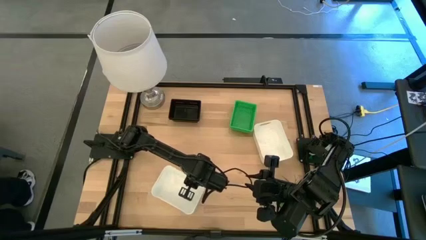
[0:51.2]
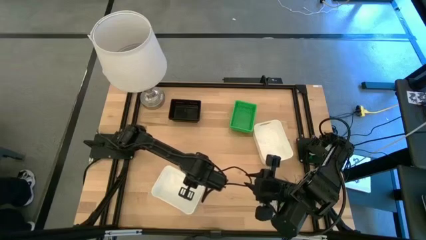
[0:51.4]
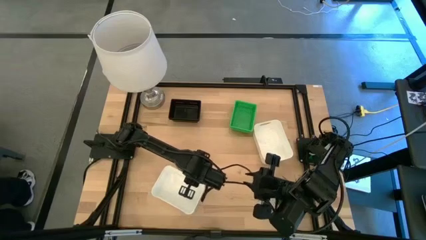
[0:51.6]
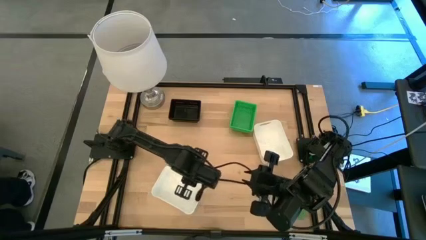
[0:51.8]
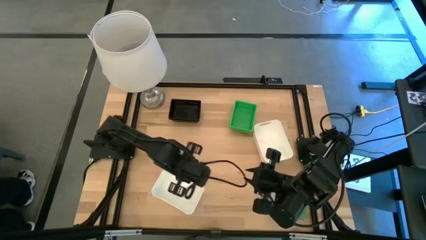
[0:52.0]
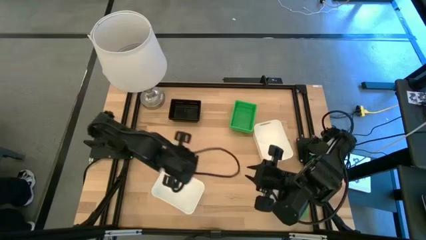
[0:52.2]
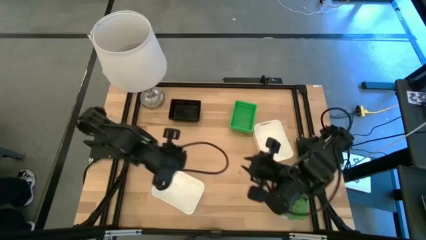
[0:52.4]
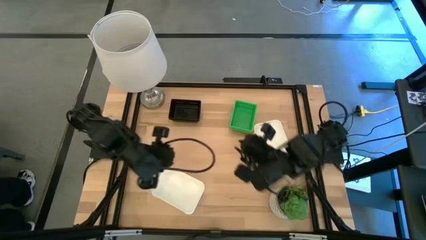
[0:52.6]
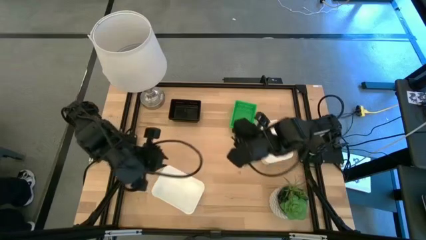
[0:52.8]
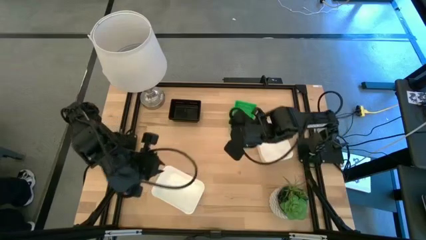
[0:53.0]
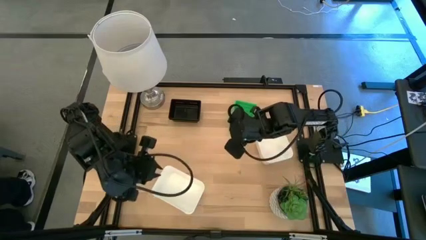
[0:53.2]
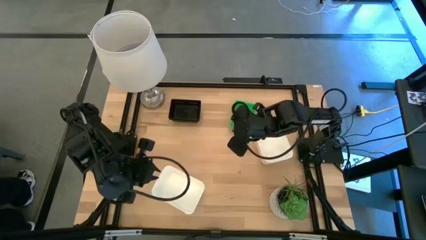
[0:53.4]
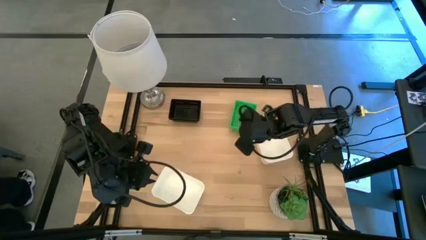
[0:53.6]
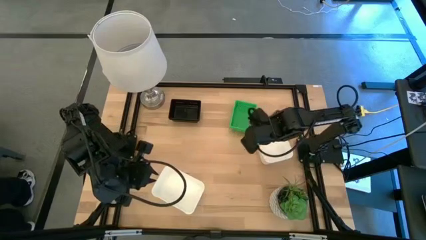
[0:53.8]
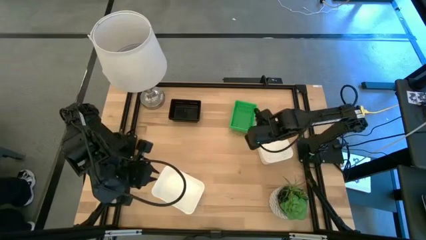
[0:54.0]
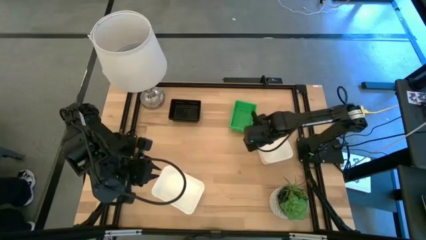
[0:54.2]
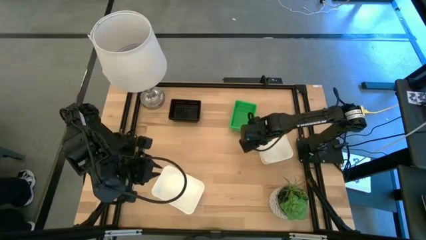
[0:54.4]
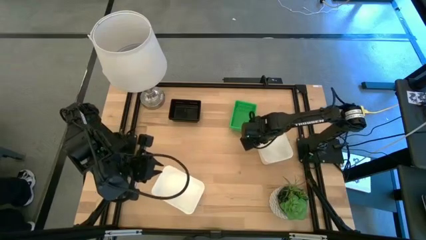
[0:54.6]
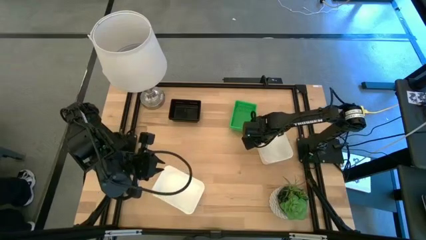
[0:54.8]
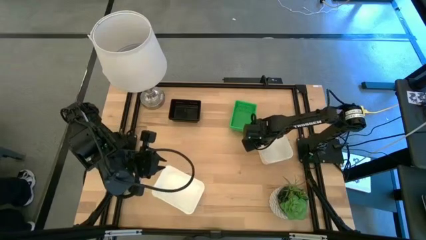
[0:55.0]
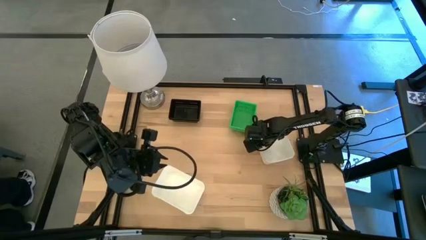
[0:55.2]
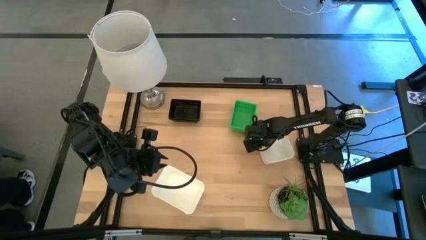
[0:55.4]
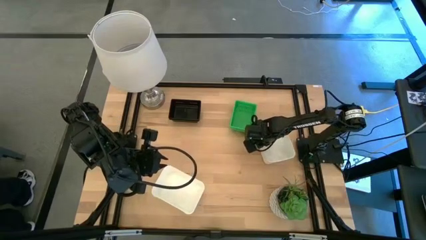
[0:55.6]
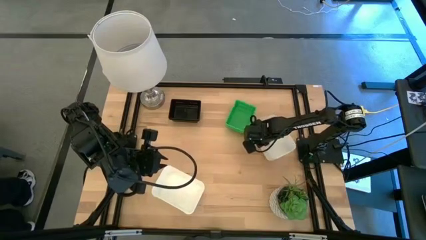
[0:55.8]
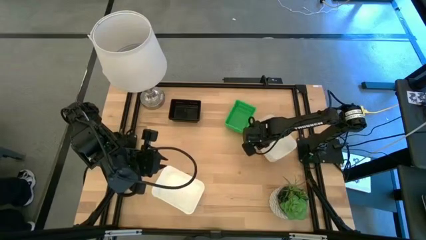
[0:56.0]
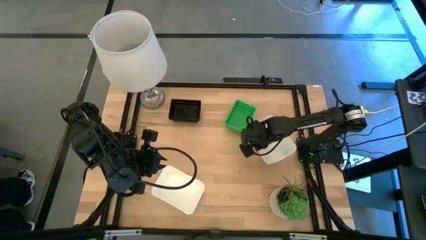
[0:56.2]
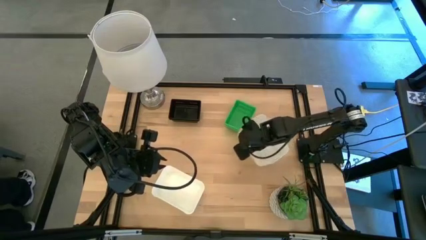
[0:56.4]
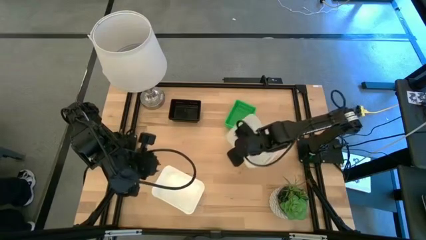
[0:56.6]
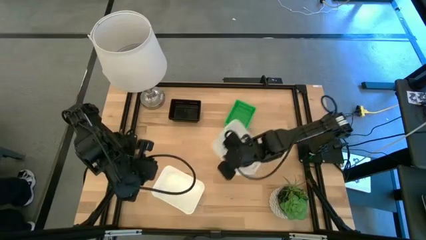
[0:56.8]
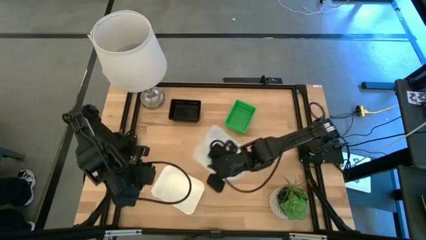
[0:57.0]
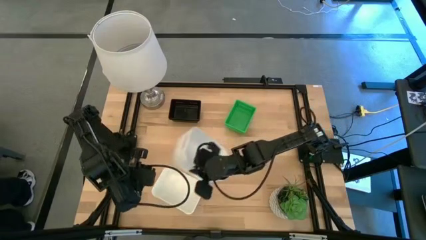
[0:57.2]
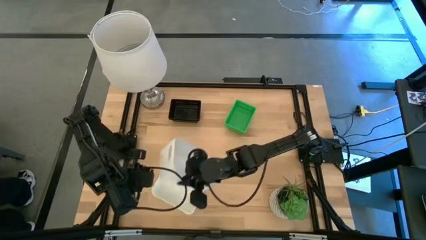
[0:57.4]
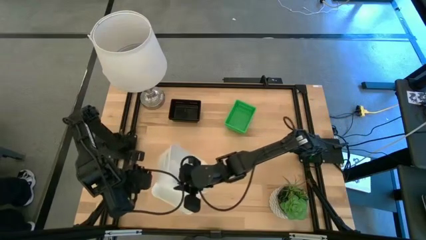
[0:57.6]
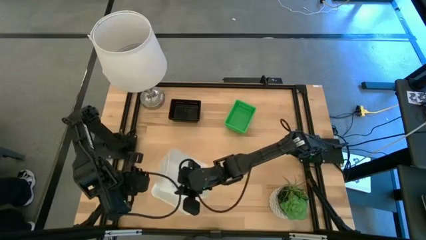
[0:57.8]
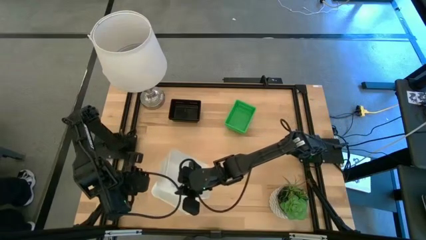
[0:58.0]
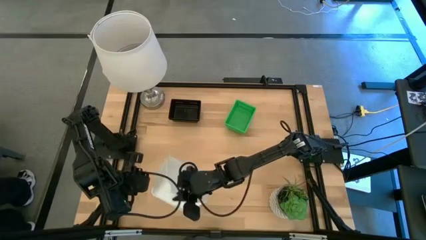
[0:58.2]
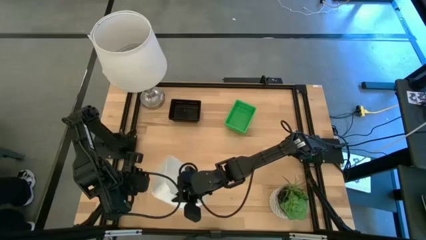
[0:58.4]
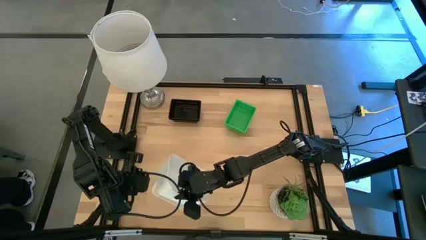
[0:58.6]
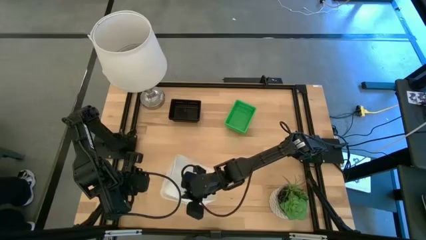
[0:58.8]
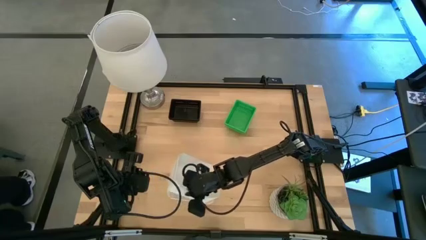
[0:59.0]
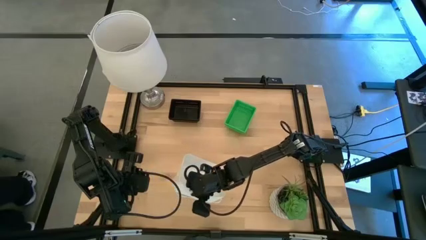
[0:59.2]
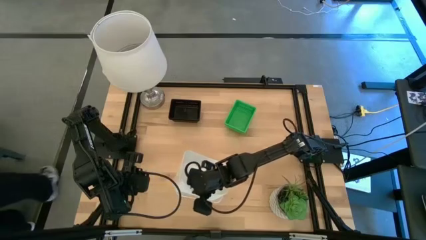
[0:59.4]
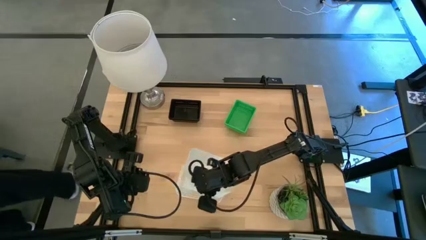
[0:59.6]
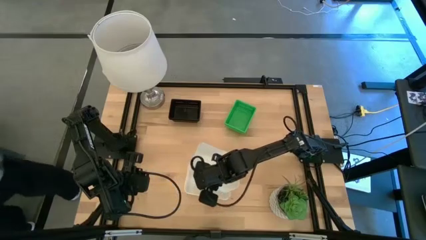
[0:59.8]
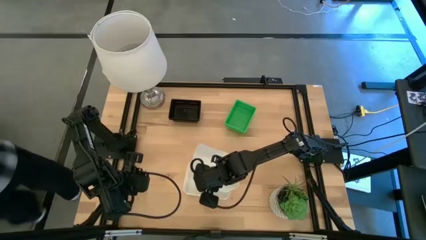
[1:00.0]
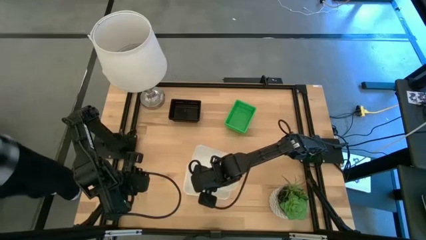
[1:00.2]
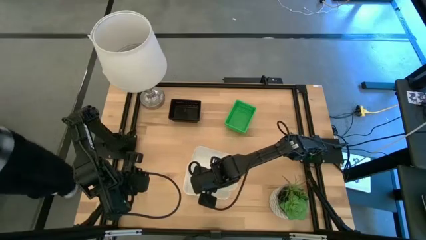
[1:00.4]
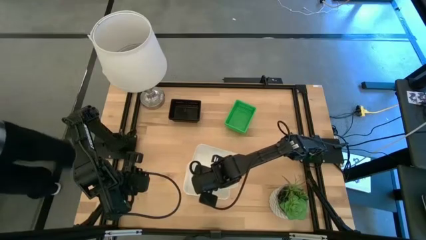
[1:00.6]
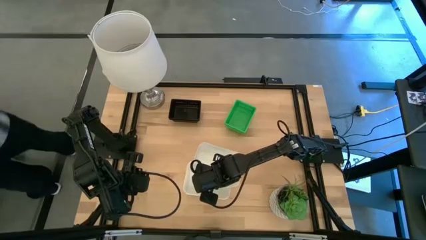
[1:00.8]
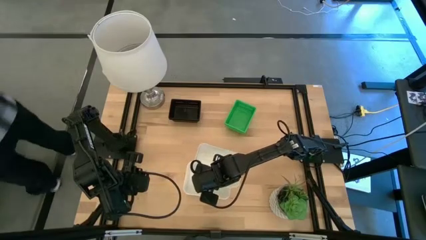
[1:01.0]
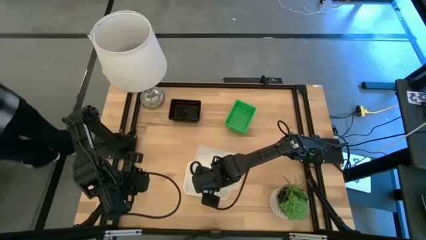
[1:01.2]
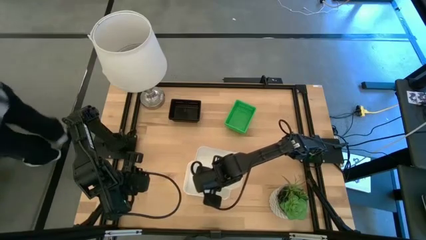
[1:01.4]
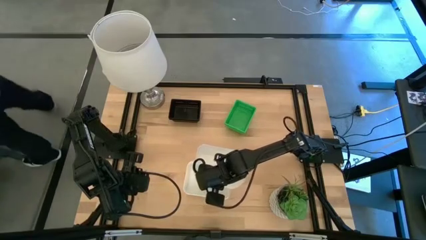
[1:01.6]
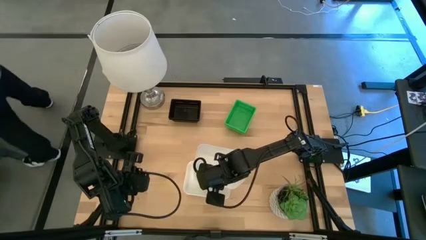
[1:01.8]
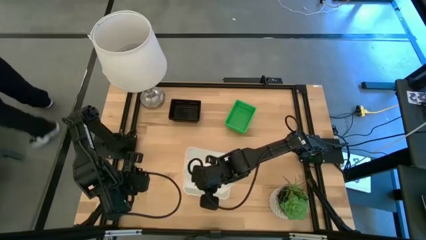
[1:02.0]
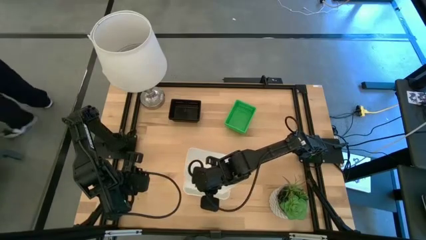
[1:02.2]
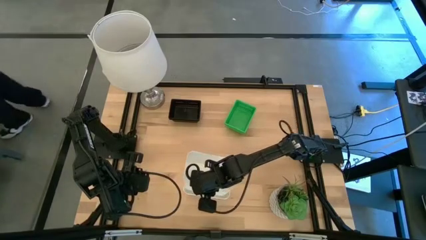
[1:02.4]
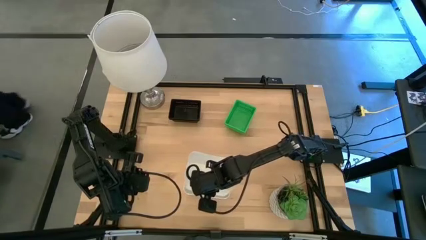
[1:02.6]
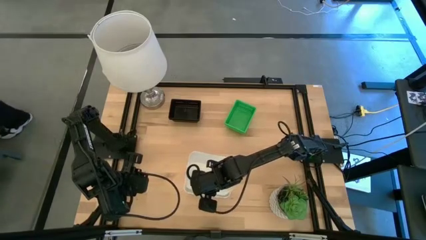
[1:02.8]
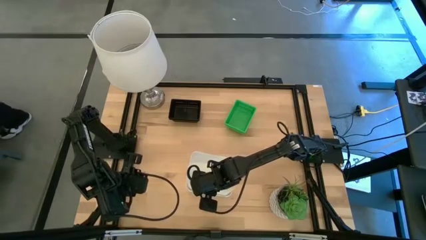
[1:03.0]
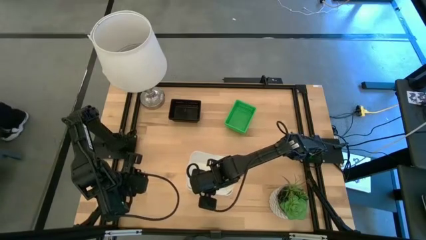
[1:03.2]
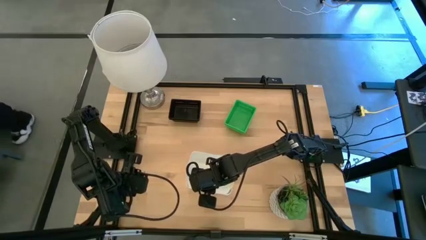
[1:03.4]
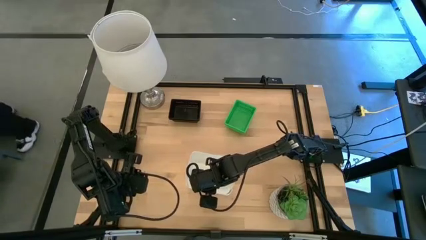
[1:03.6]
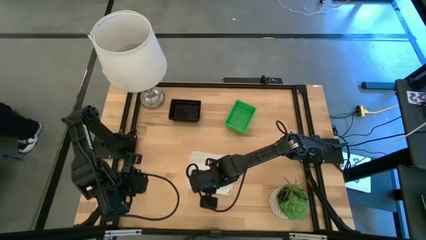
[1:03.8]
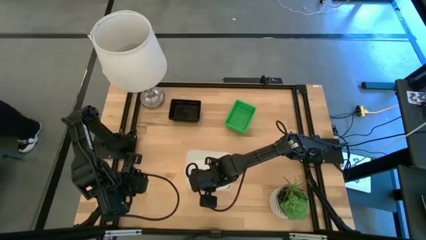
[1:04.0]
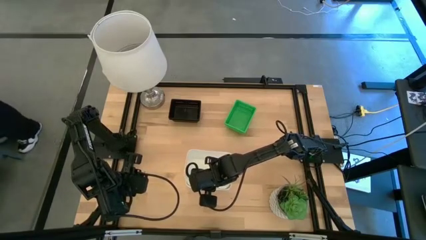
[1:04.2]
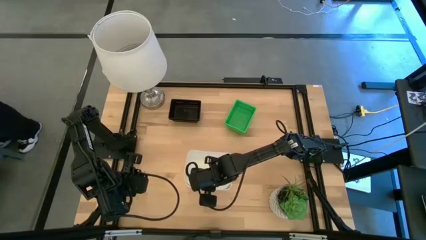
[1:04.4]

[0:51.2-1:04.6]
Stack the right white bin on top of the left white bin
